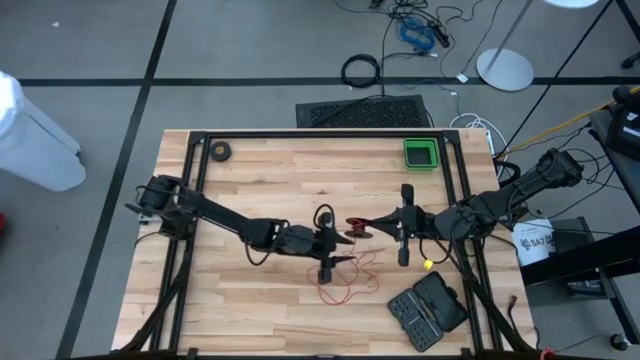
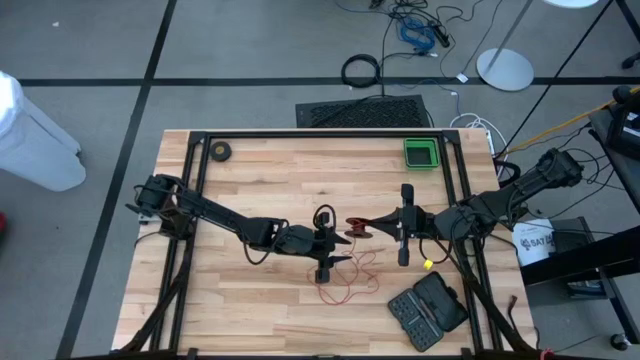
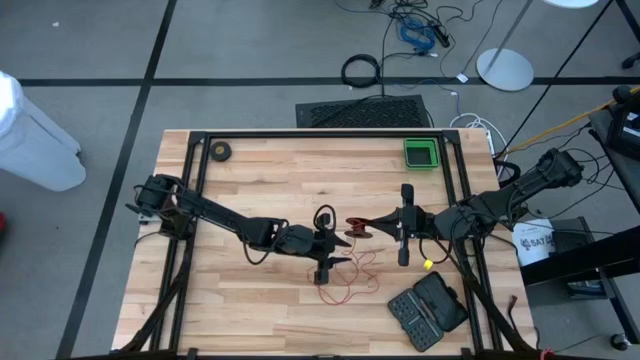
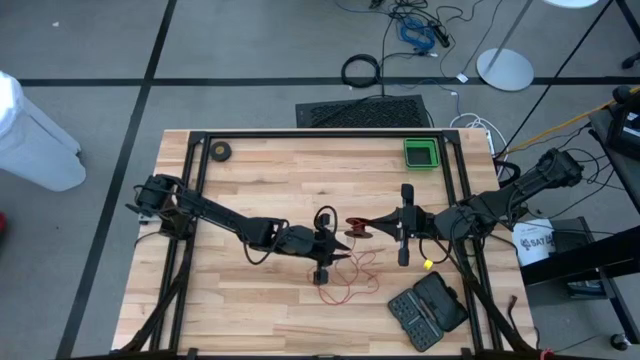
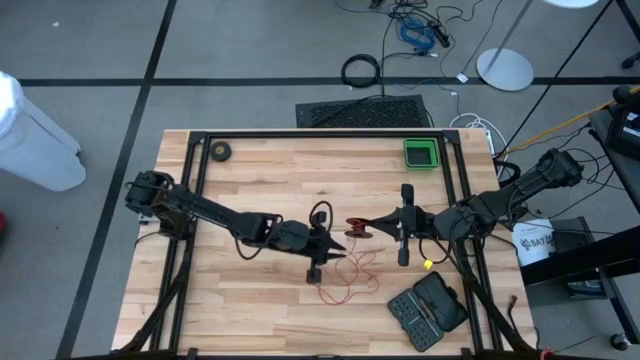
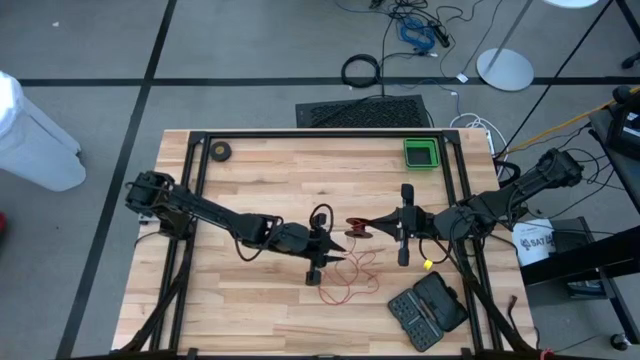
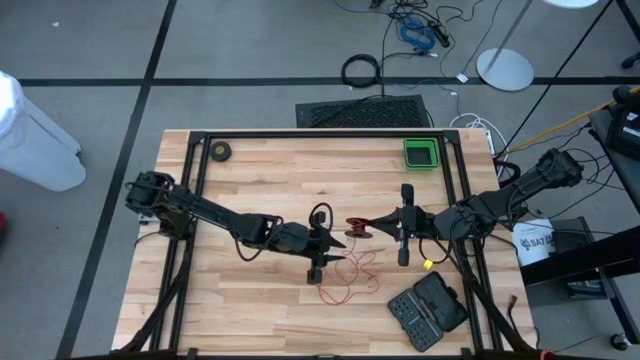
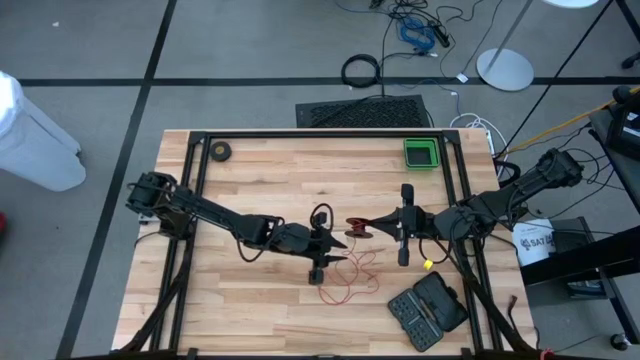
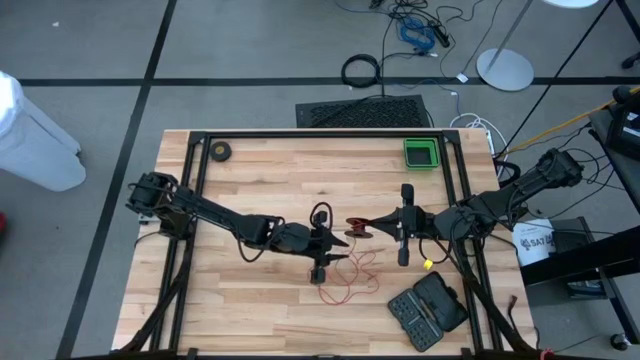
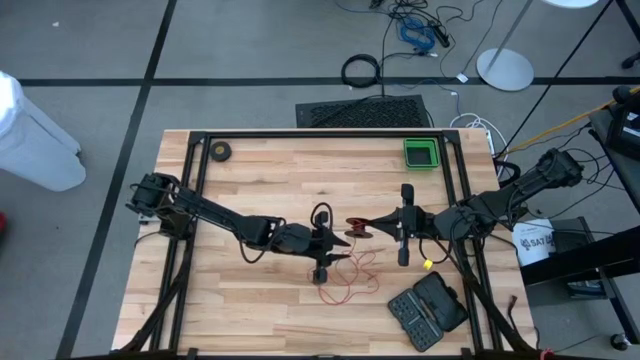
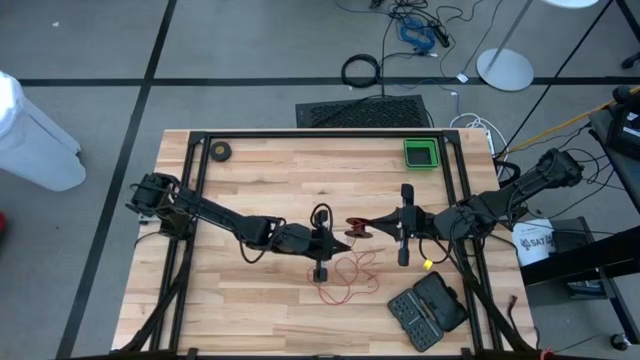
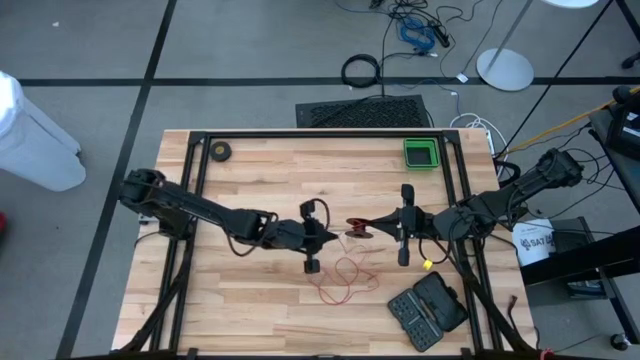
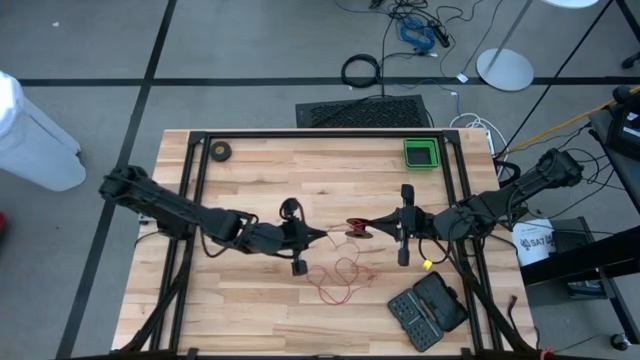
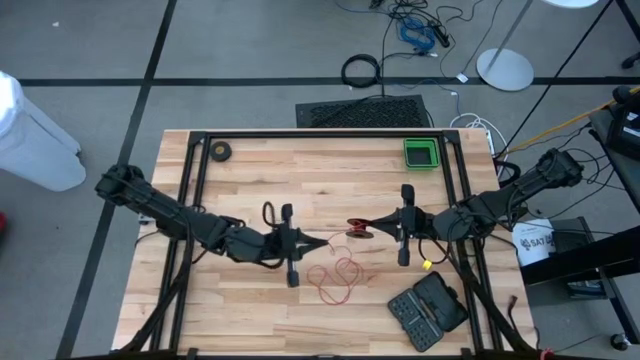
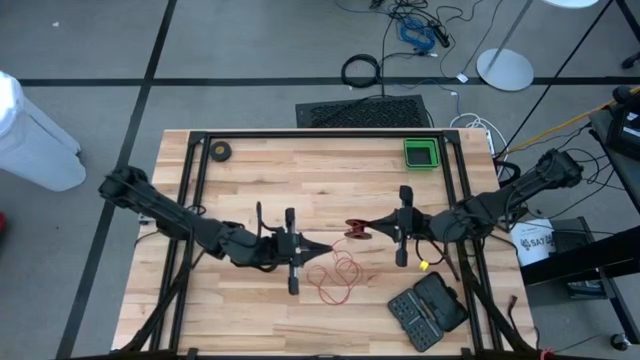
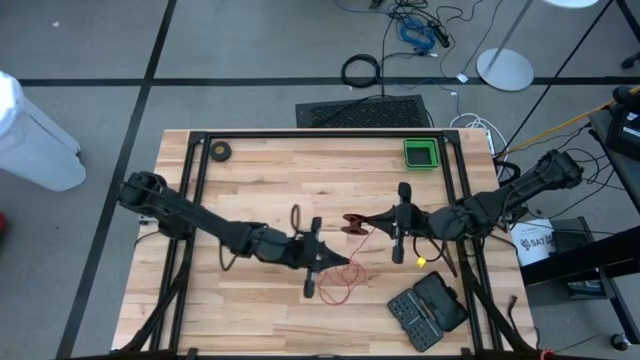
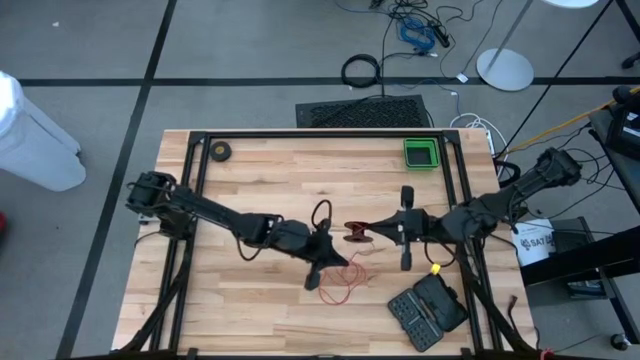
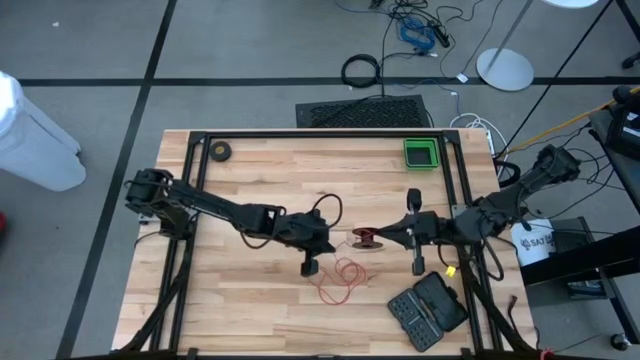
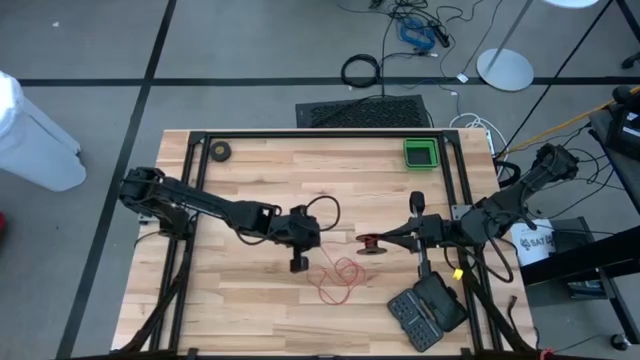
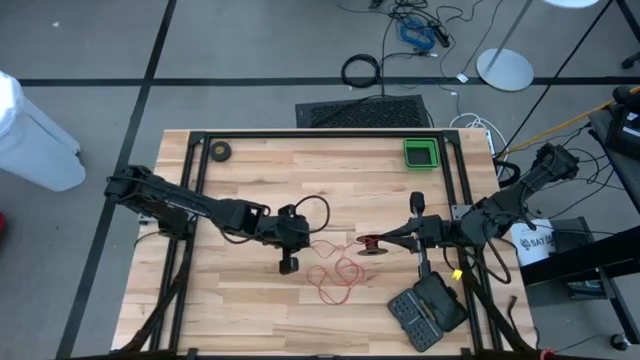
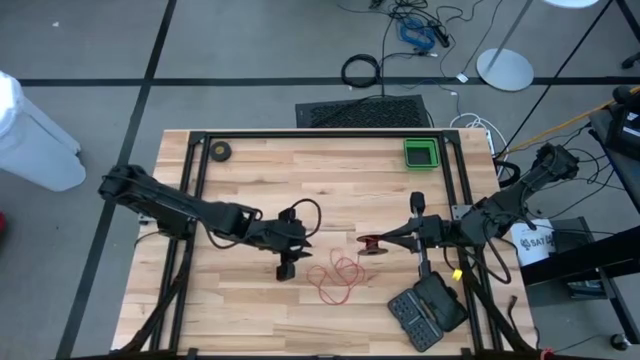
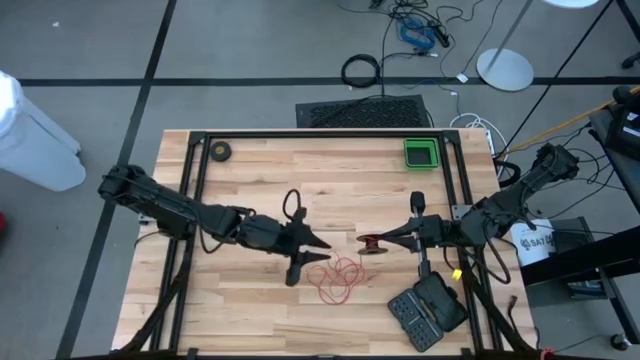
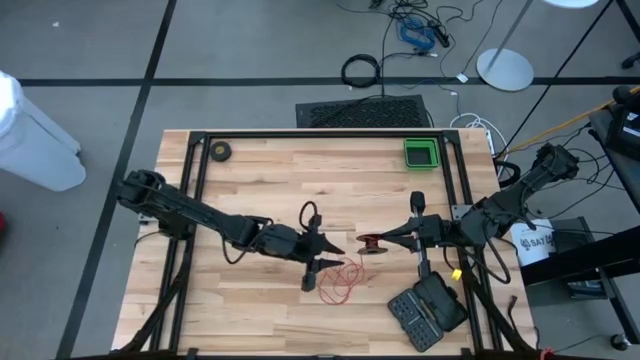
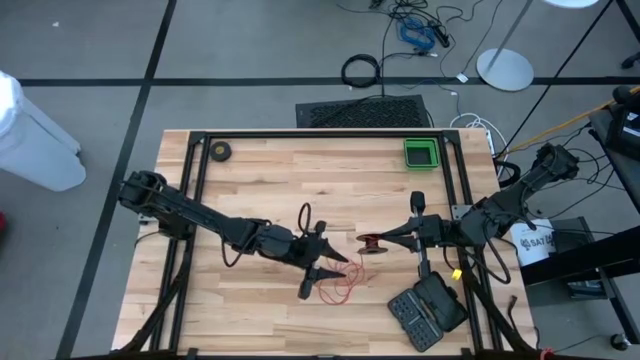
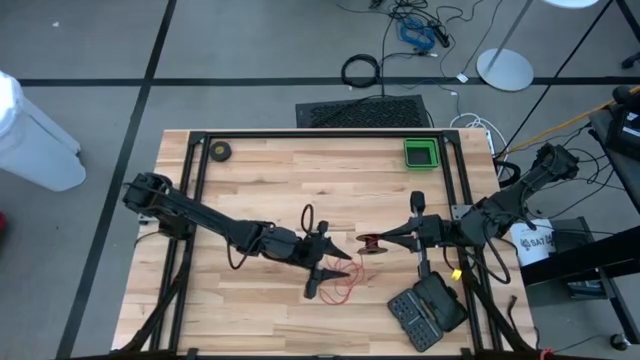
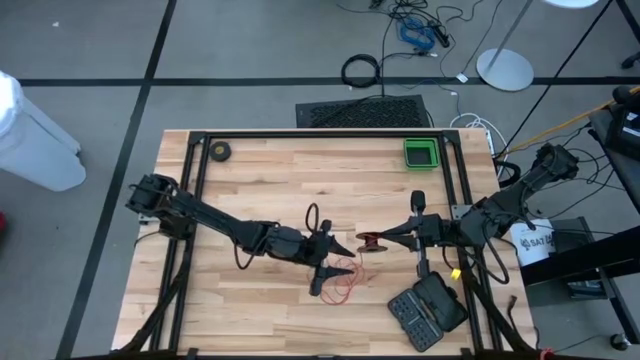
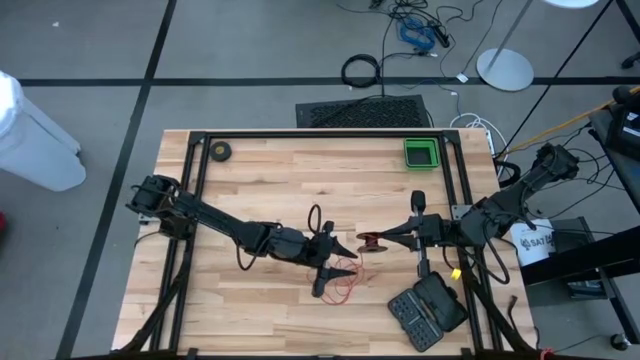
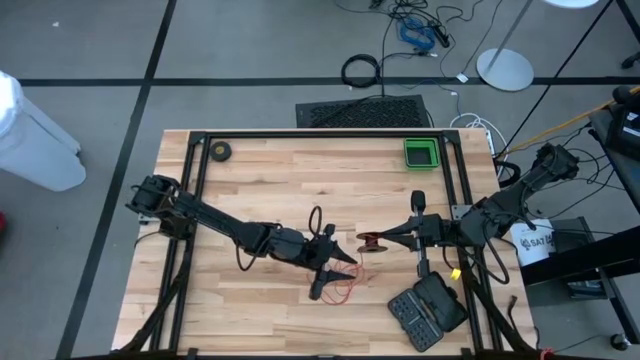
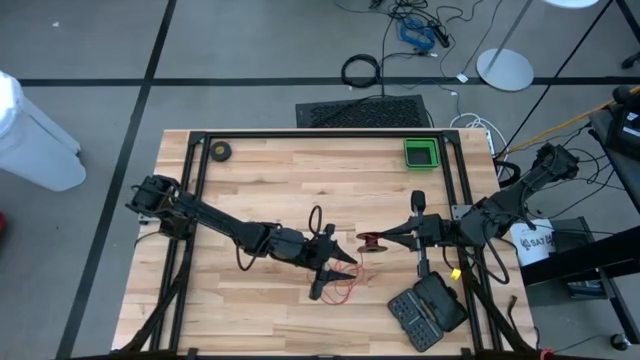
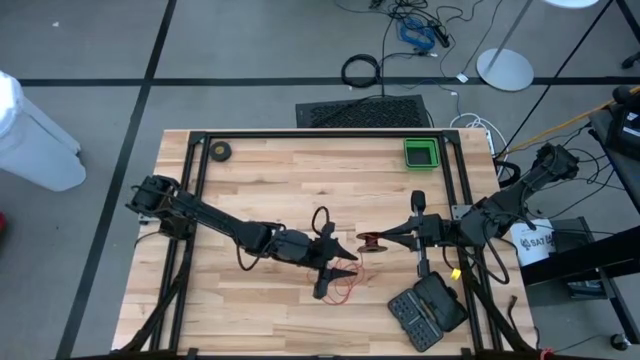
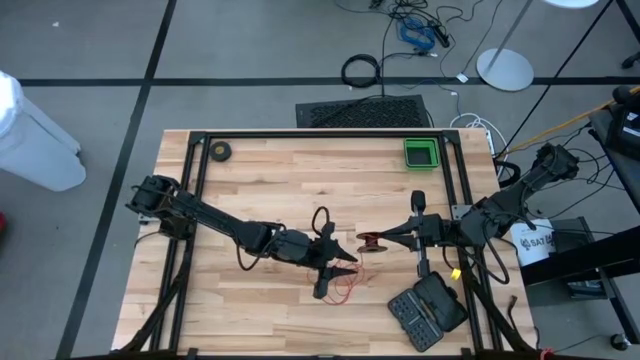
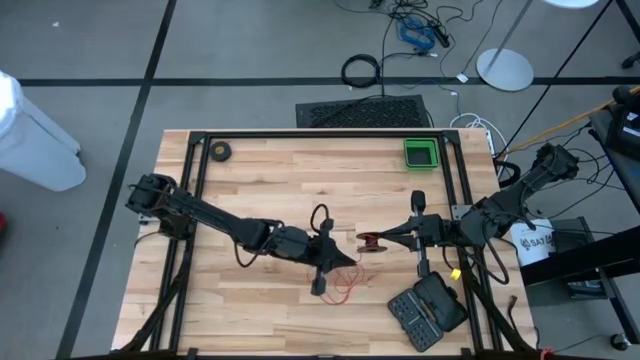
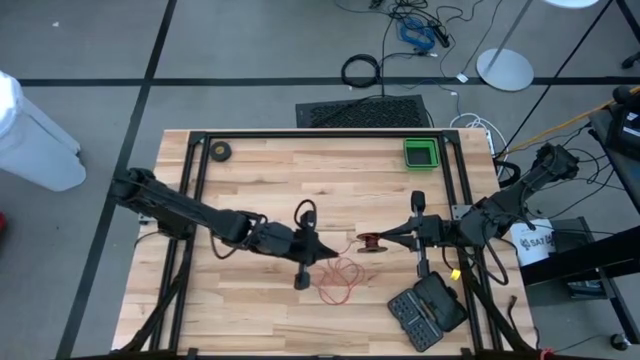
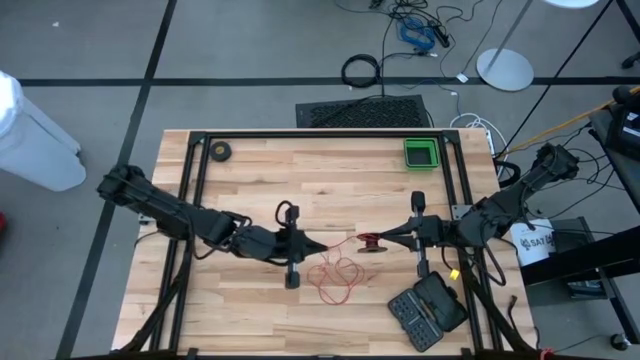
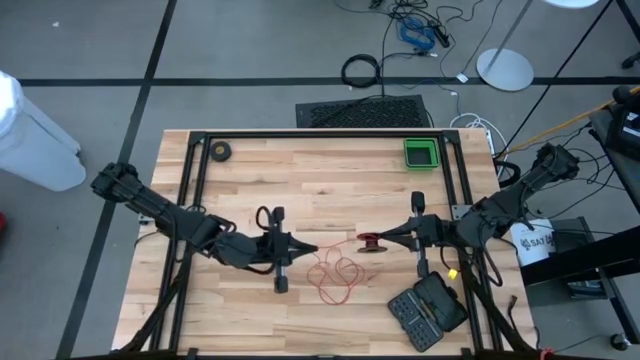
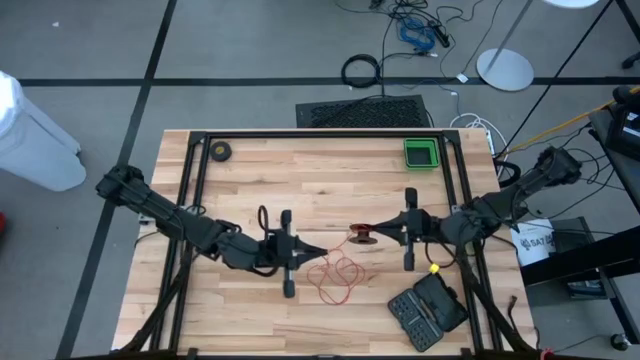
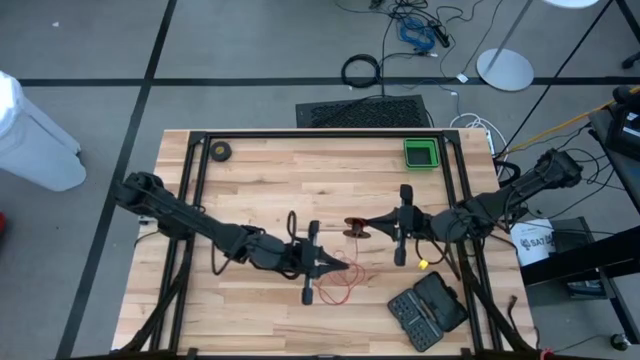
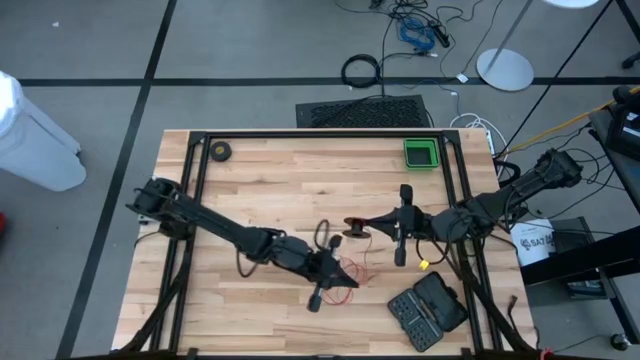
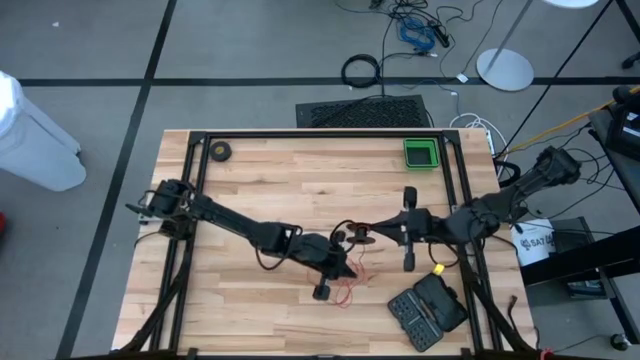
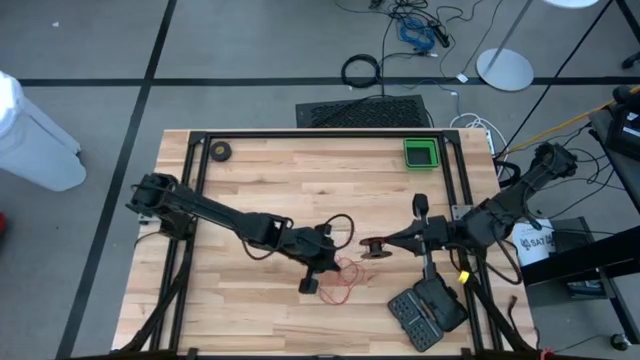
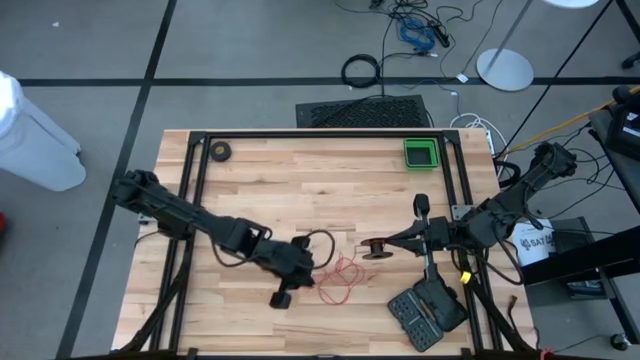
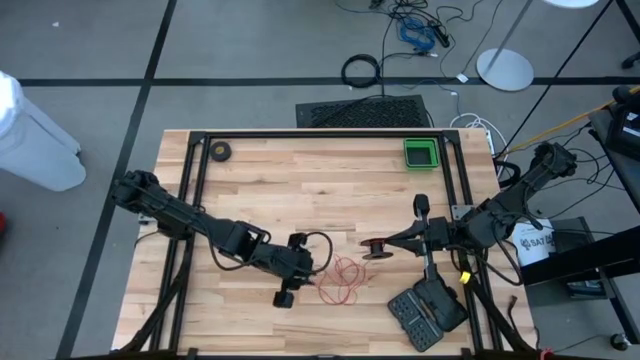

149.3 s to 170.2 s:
Task: Coil cords
Uncoil the red wire from the spool
